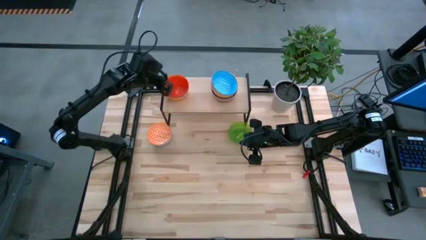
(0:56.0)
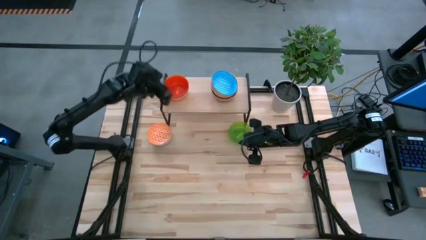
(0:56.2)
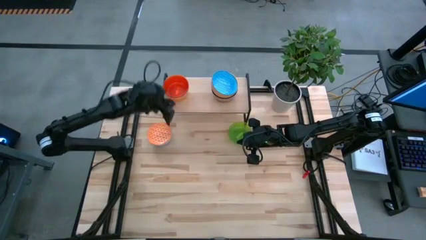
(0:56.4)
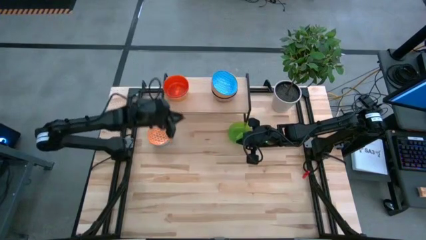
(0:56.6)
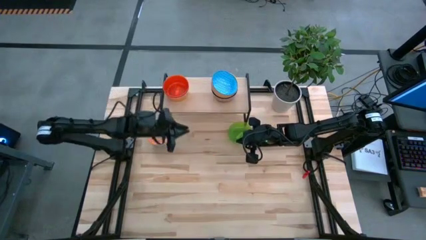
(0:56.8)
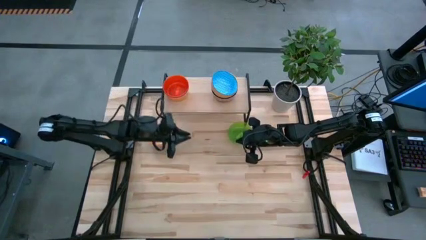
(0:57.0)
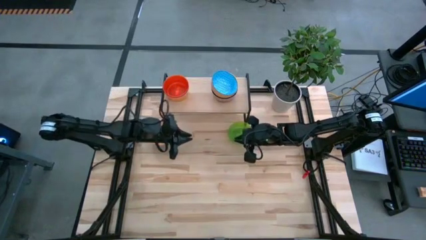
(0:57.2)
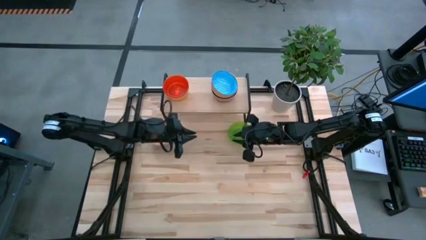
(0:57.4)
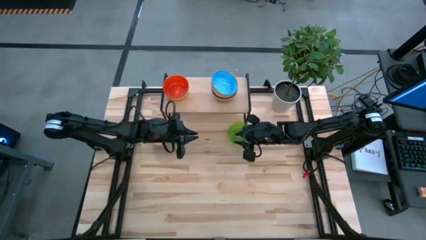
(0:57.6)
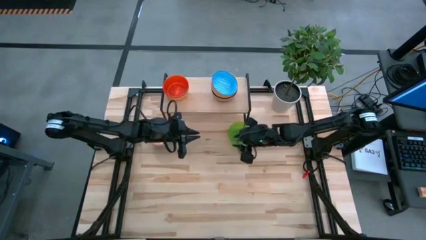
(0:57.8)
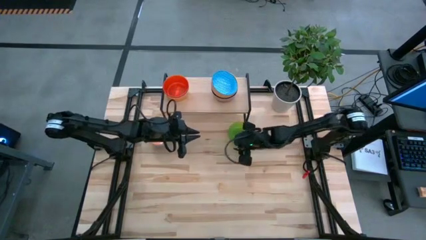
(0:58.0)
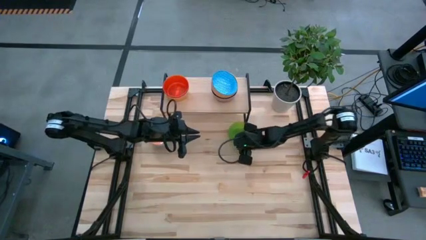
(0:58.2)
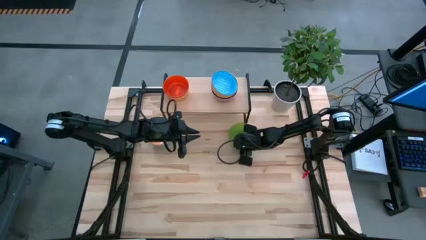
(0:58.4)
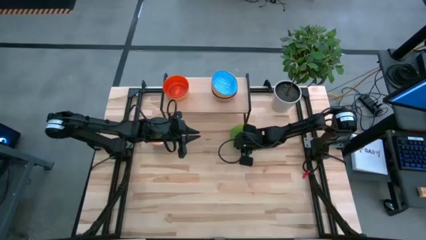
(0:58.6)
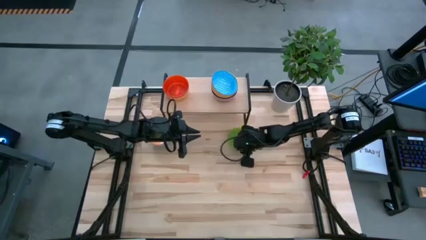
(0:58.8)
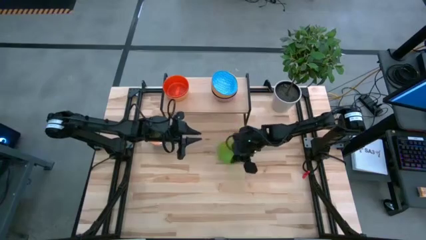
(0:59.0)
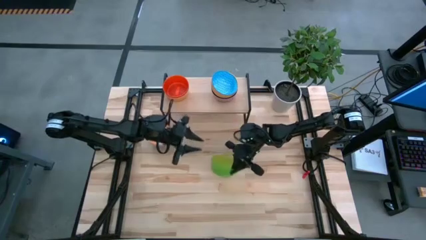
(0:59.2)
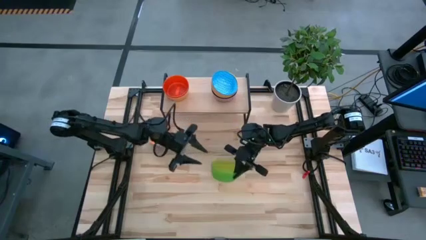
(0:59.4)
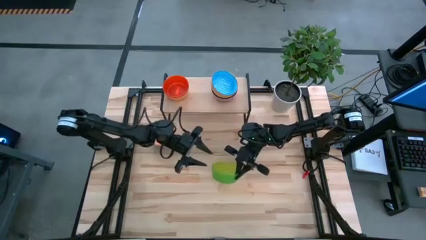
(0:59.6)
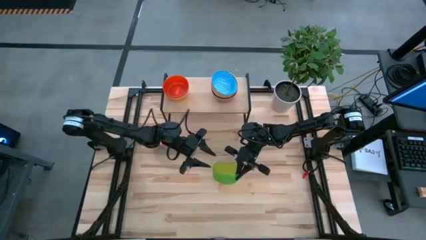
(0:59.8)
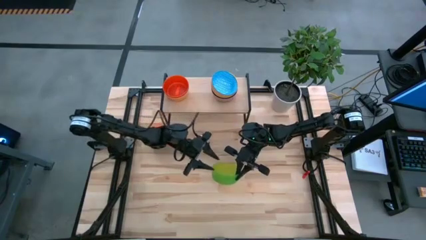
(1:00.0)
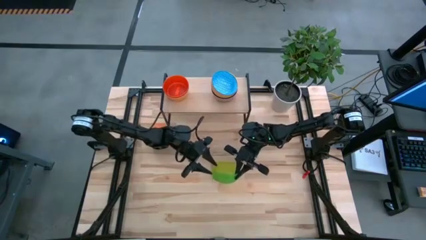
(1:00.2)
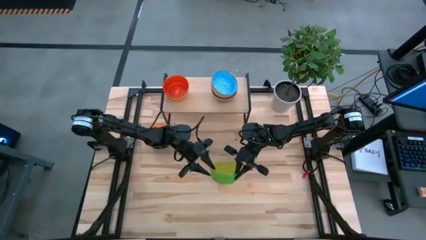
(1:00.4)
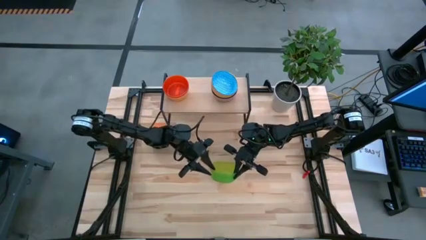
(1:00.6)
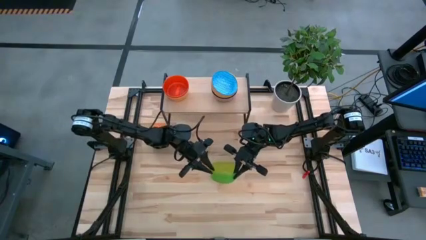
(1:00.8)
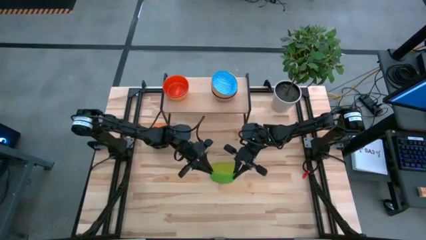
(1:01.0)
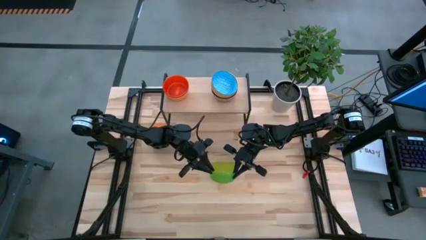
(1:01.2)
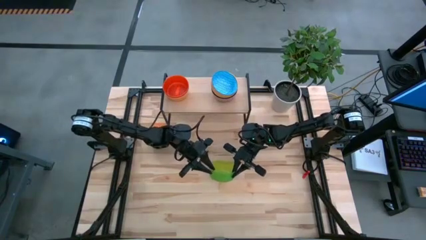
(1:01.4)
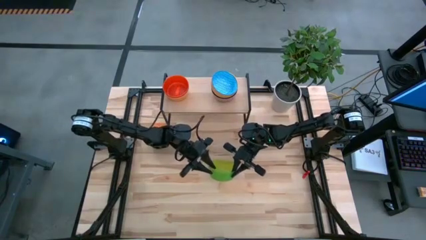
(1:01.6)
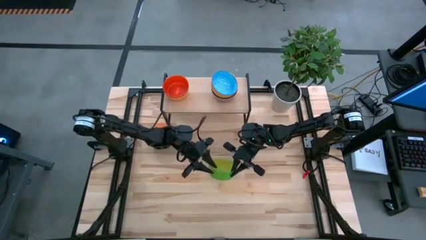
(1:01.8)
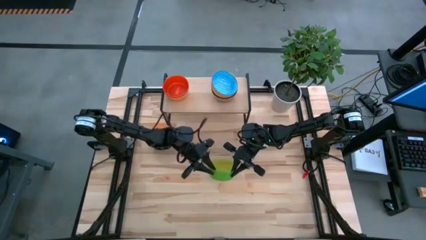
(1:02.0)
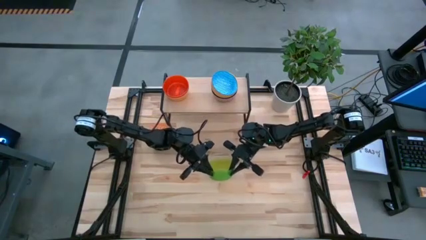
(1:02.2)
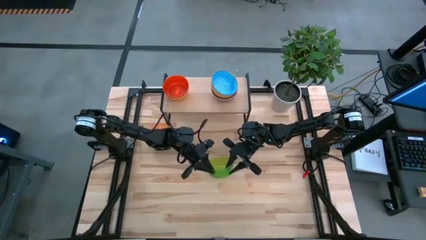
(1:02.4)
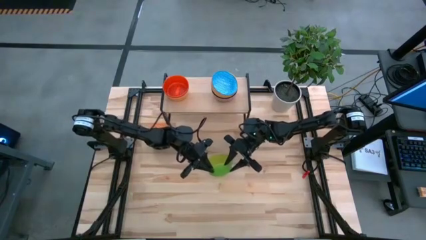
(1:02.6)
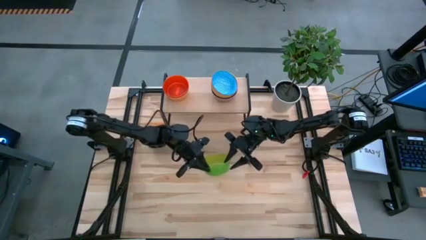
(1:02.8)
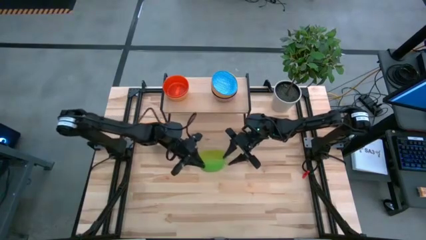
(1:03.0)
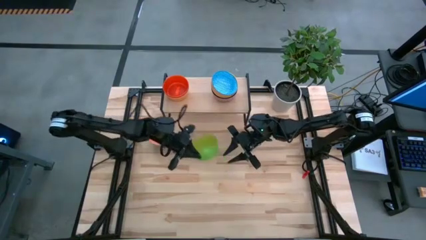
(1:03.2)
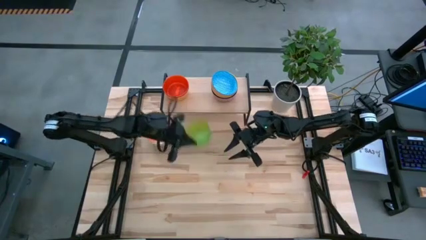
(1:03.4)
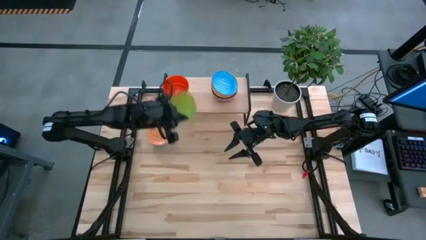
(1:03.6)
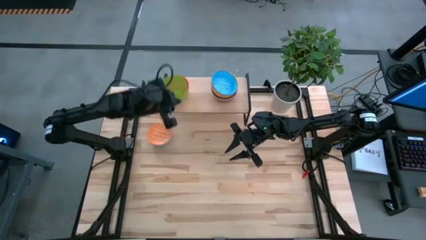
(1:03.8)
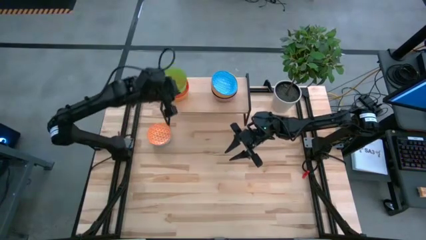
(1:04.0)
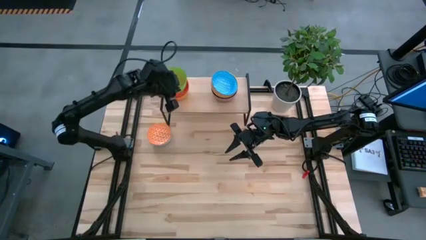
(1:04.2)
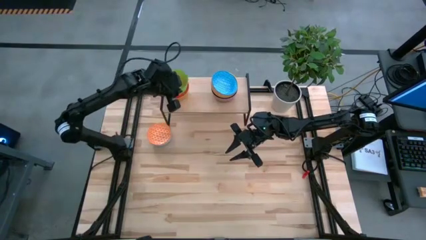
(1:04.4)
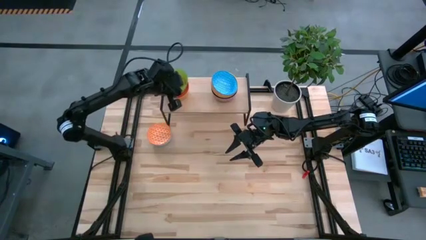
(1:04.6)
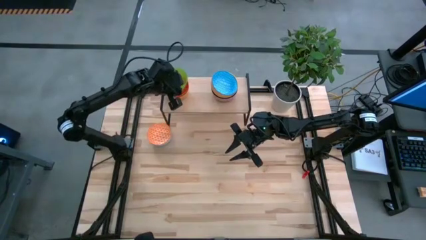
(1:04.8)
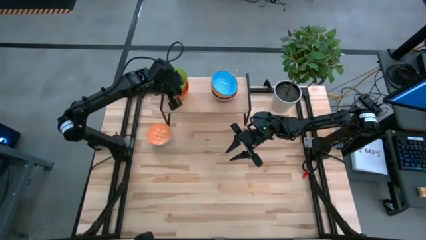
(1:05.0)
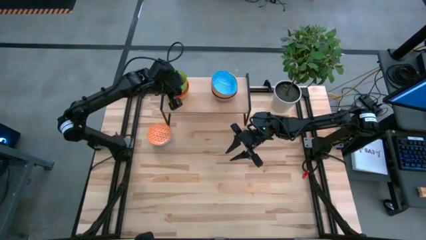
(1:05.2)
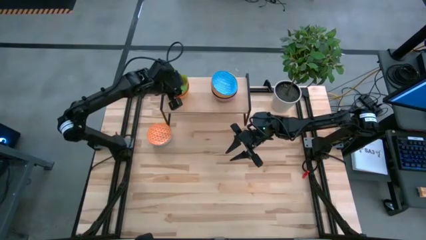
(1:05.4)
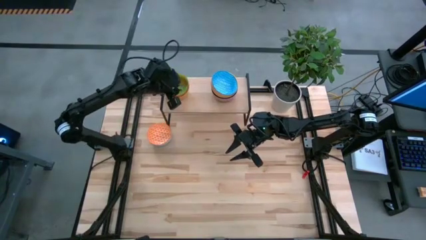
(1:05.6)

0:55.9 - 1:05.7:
Task: Place and stack bowls onto a shelf
Stack the green bowl on top of the orange bowl on the shelf

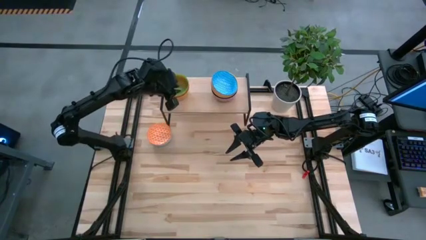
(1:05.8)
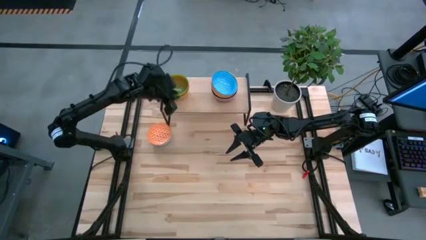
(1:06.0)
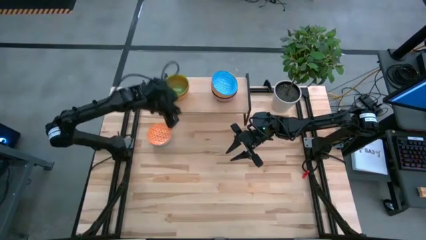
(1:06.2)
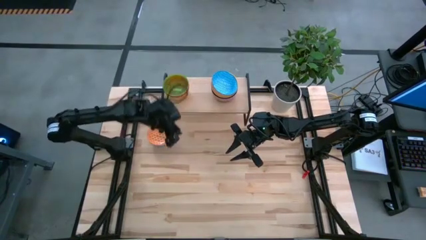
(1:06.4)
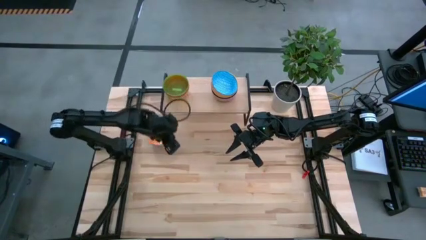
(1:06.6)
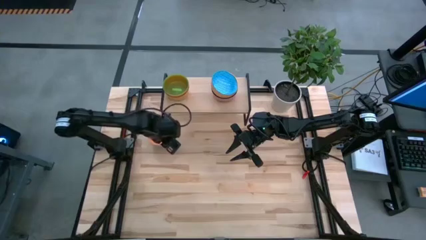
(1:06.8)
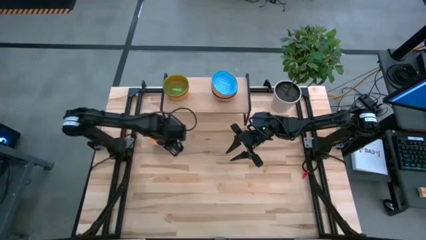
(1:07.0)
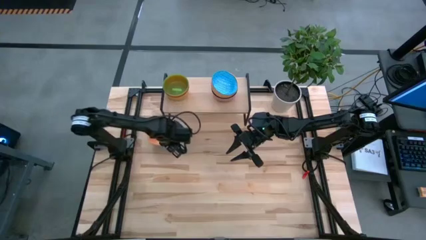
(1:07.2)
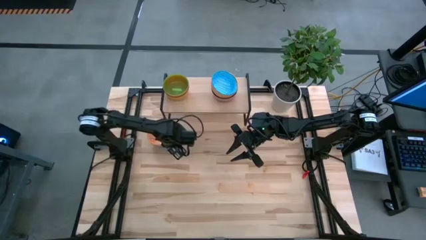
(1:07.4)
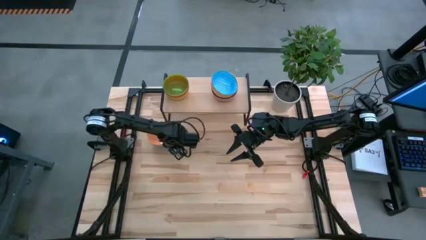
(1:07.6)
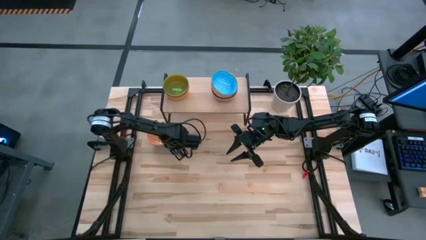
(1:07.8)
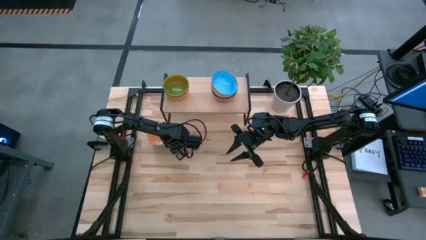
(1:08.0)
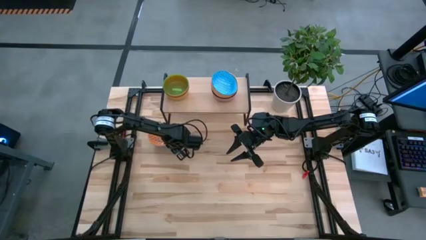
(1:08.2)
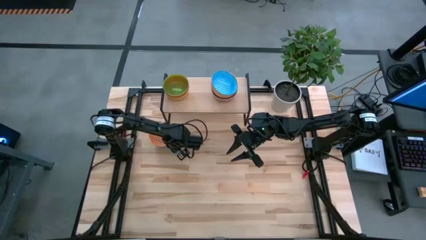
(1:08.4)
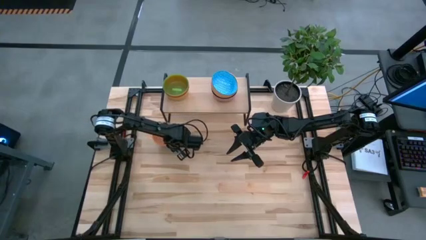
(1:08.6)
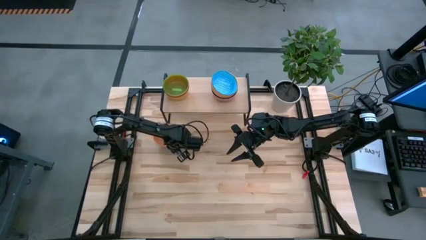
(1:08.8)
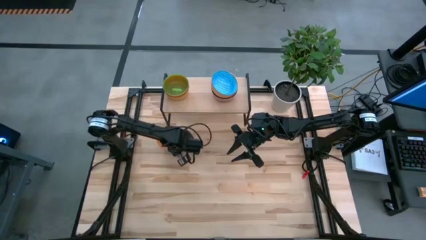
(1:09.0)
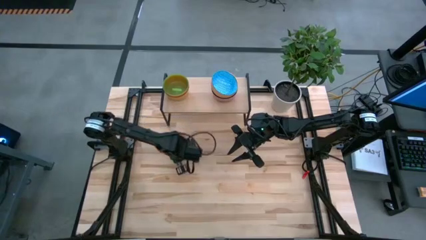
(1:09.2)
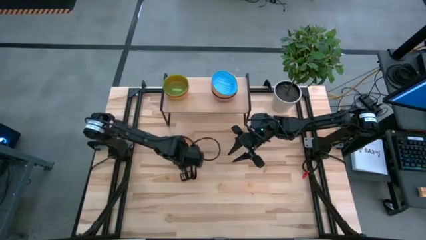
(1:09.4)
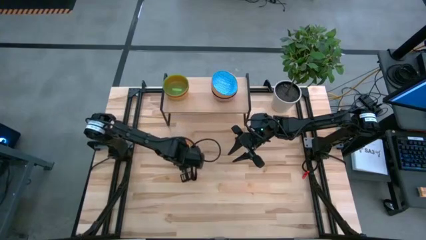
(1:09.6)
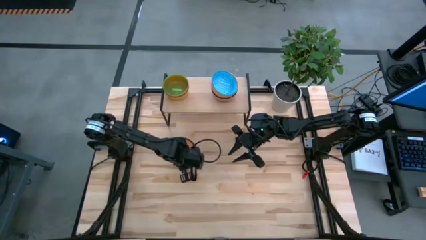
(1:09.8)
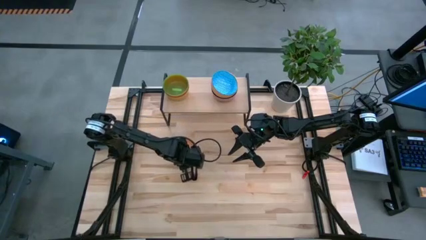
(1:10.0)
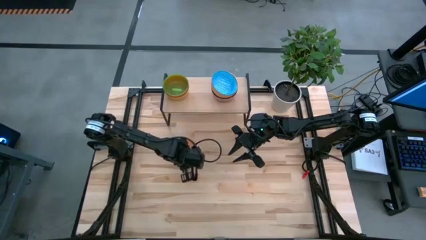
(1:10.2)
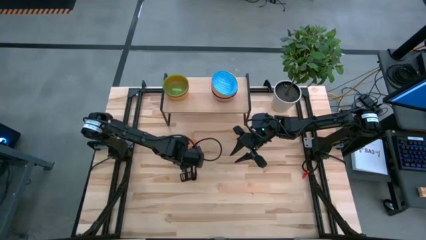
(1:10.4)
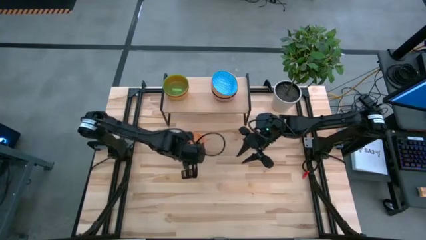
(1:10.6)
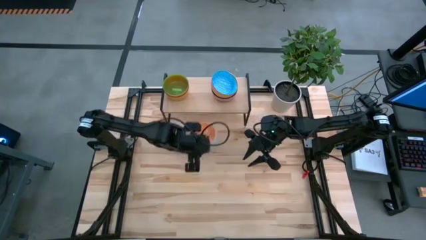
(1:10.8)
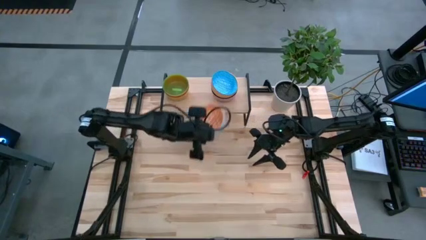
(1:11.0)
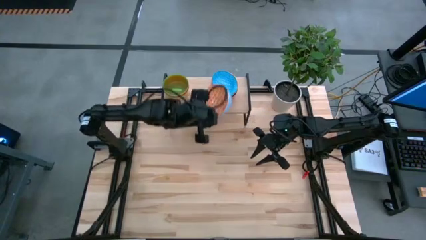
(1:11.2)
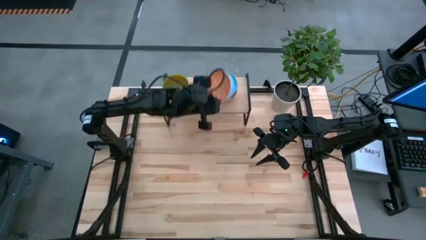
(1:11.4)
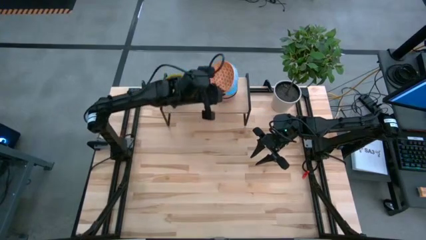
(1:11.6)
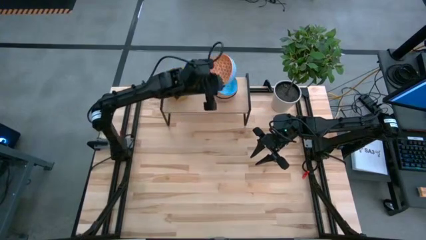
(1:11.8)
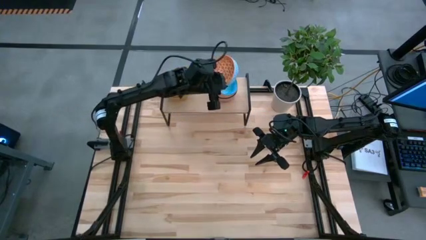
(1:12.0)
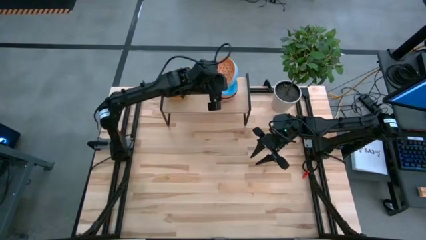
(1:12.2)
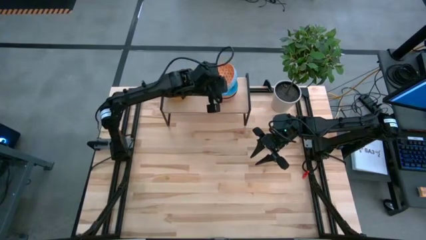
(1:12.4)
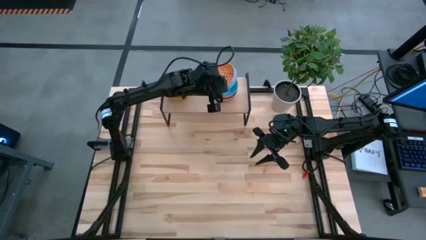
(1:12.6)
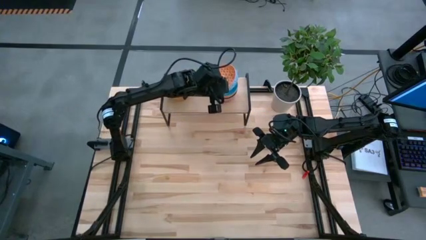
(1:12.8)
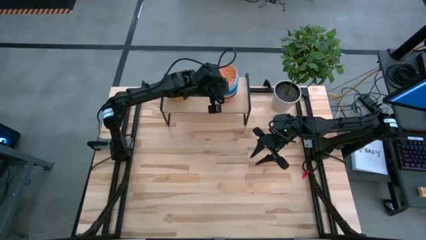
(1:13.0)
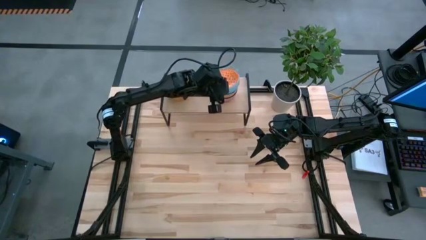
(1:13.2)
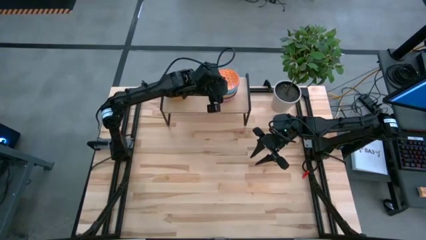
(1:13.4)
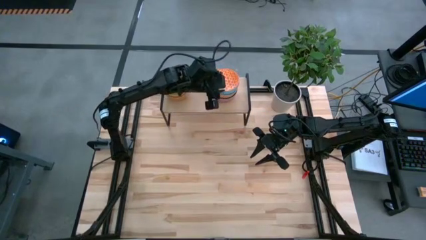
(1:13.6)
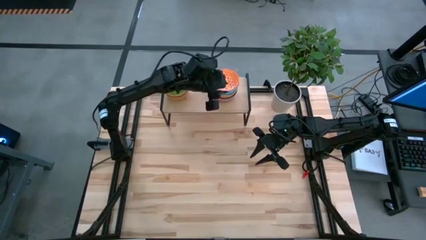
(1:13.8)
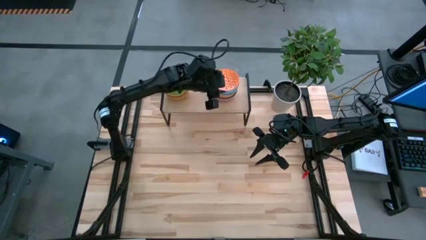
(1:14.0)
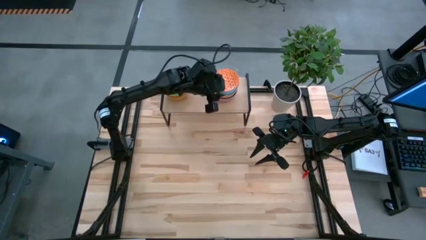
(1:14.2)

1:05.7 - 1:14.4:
Stack the orange patterned bowl on top of the light blue patterned bowl on the shelf
